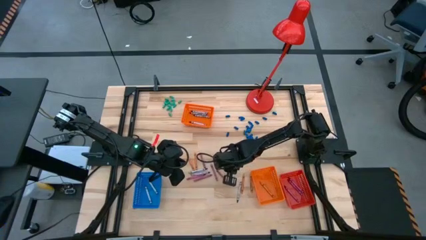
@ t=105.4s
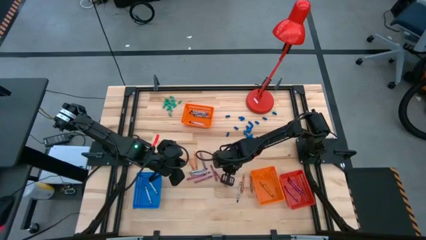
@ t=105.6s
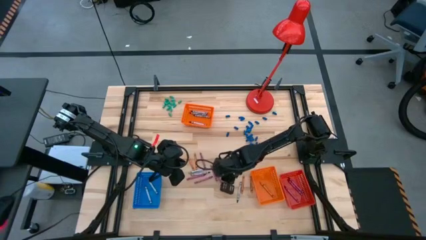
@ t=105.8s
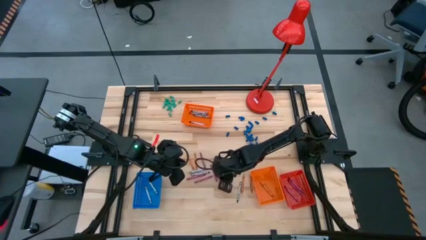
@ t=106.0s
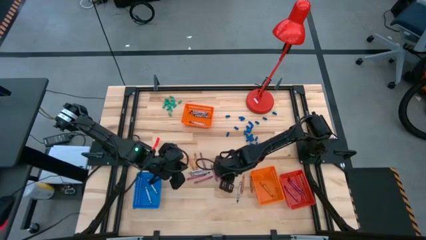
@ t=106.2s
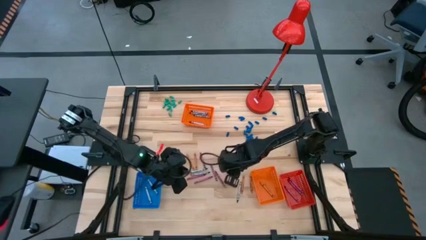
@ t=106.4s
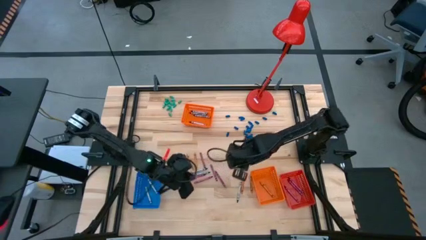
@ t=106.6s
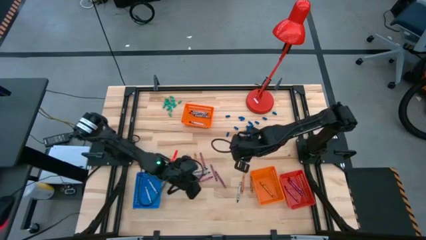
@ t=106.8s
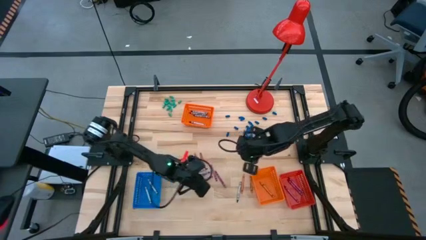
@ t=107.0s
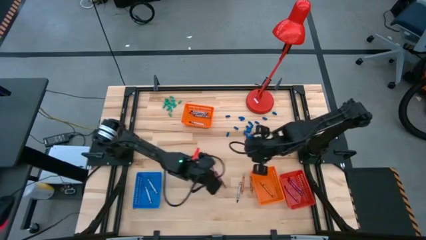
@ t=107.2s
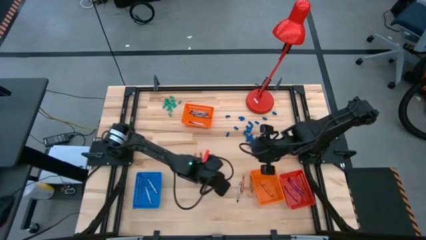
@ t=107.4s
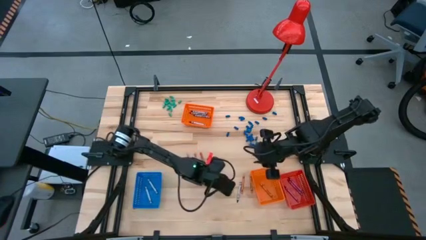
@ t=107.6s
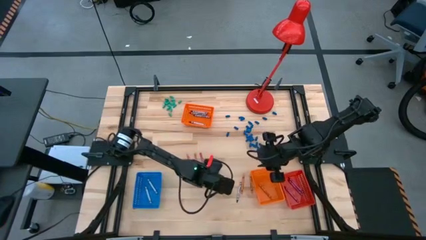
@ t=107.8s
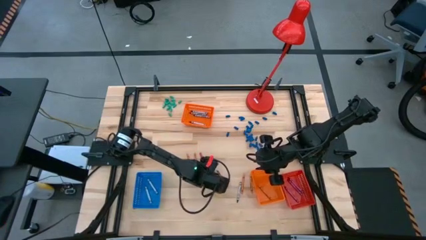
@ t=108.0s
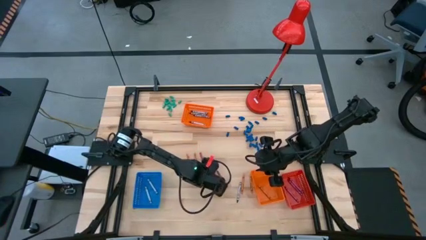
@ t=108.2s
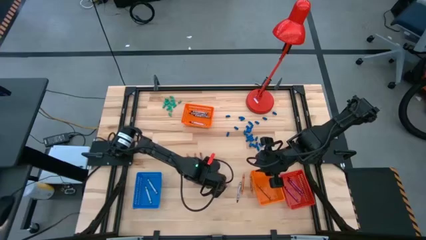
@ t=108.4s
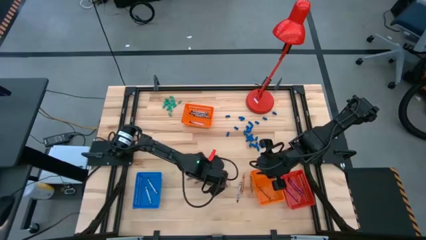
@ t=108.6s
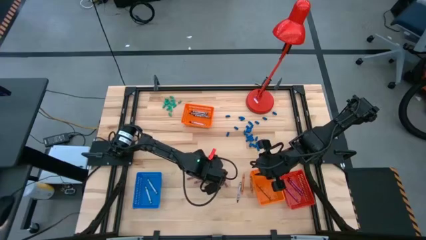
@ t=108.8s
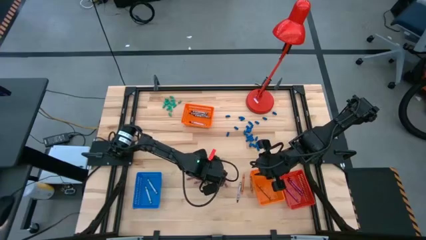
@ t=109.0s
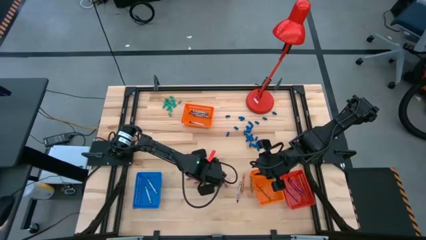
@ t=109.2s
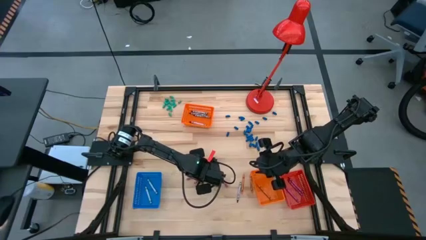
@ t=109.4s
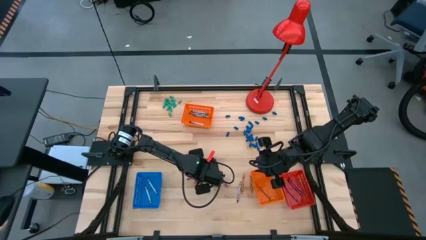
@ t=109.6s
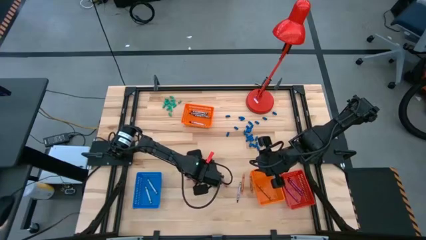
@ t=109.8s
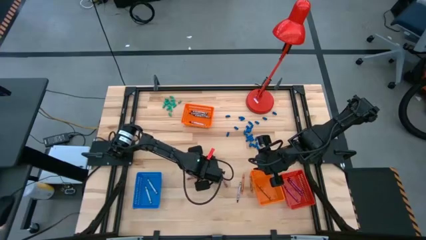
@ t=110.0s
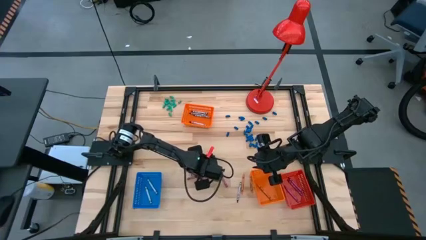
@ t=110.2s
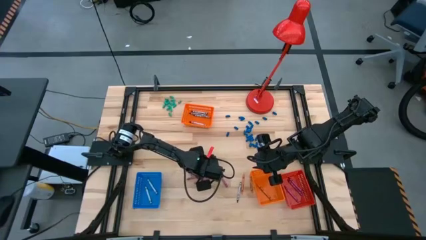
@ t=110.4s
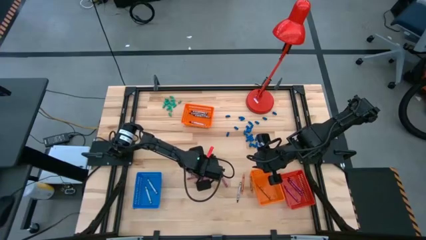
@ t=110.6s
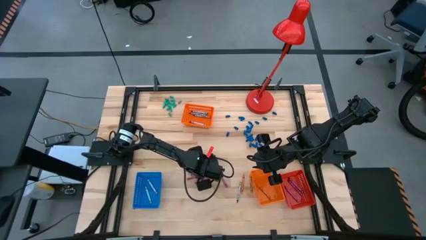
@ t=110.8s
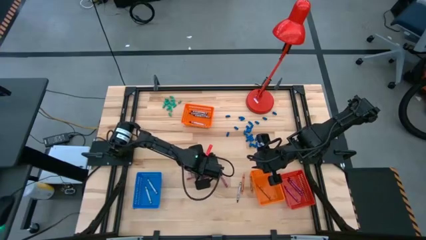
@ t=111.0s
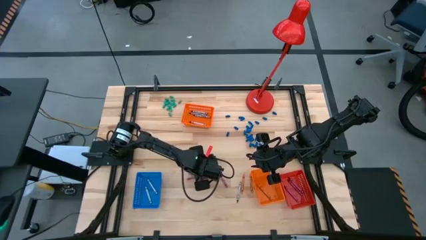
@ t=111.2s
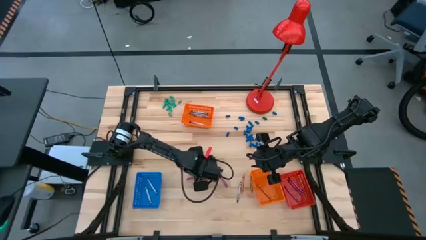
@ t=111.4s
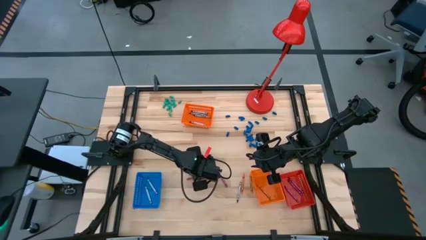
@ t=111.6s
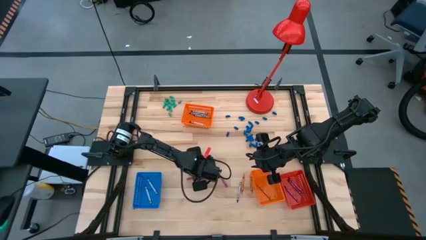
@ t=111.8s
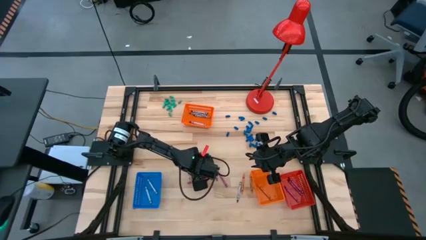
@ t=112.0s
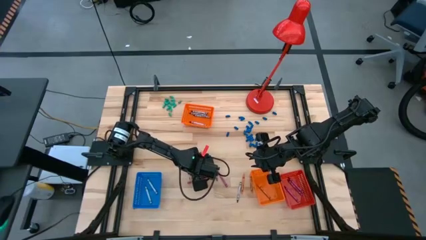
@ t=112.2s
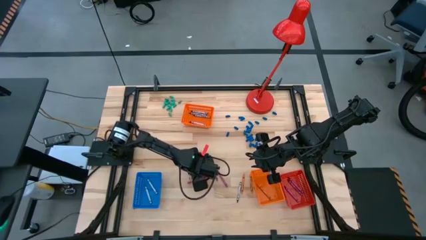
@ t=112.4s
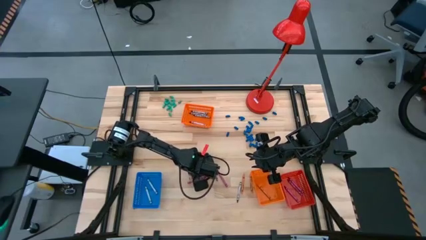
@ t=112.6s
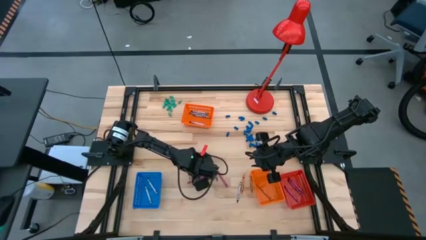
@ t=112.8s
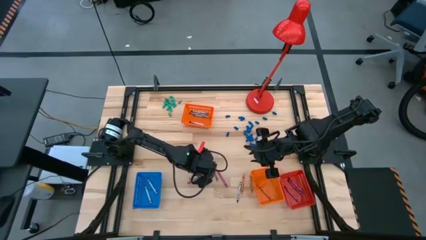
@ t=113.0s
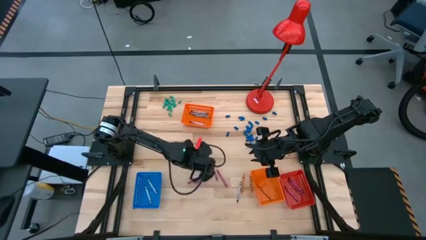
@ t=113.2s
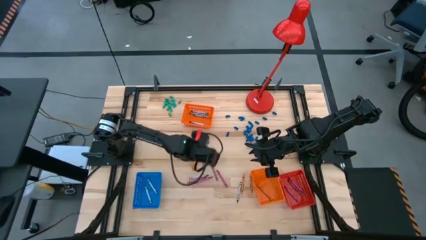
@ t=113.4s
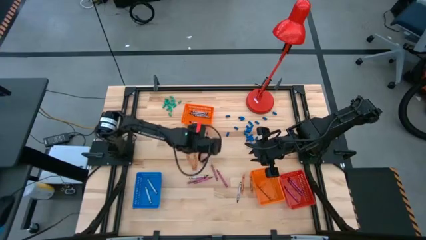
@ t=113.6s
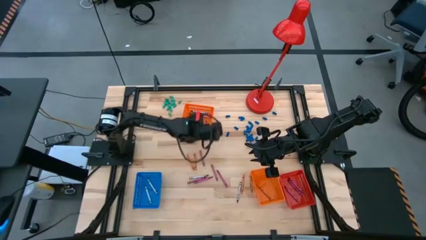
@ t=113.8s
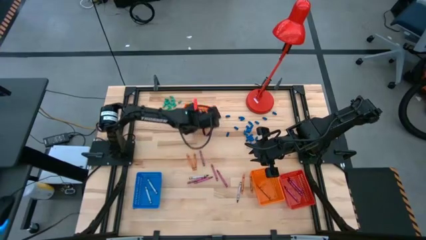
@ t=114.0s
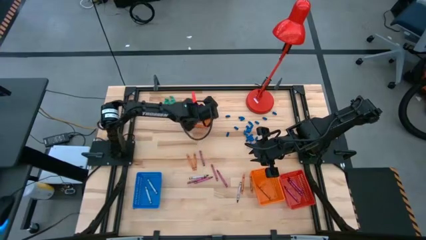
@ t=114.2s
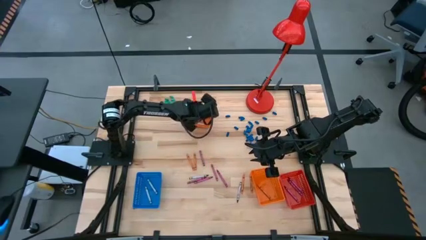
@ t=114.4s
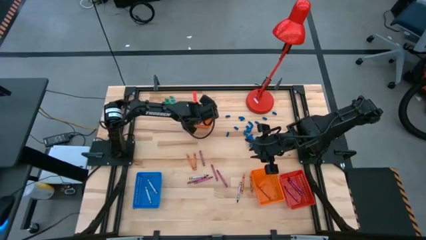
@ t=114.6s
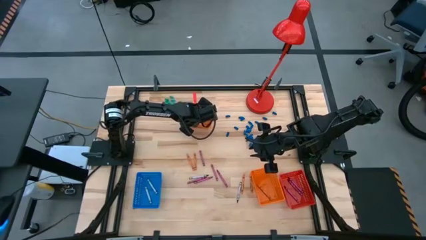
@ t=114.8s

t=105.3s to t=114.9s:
Task: Sort crayons
Put the black crayon into the top orange bin

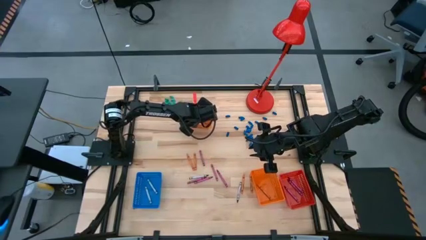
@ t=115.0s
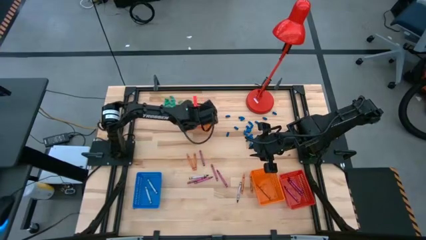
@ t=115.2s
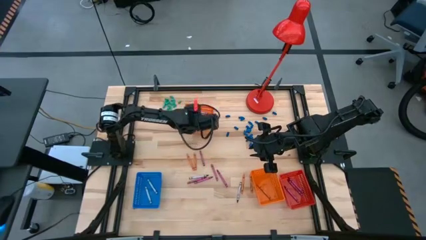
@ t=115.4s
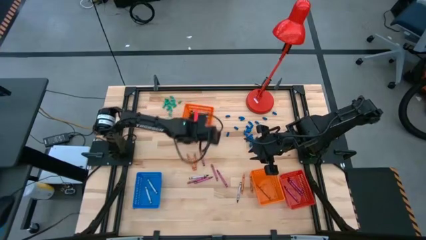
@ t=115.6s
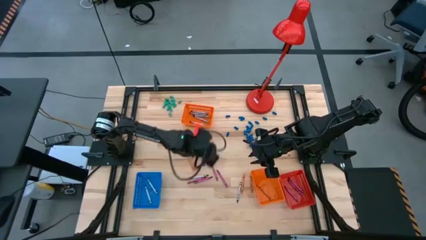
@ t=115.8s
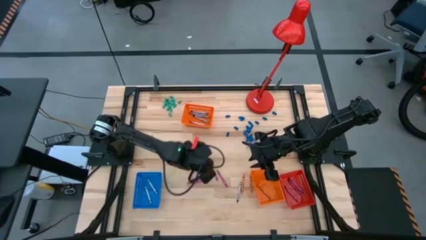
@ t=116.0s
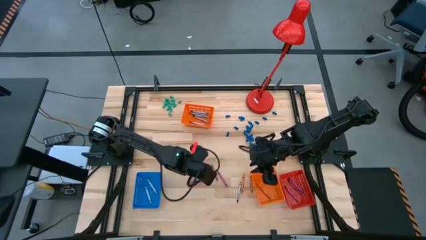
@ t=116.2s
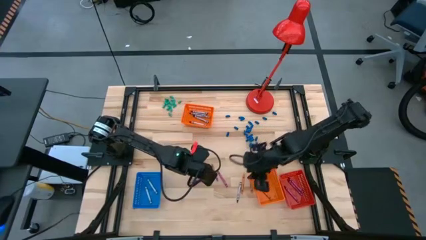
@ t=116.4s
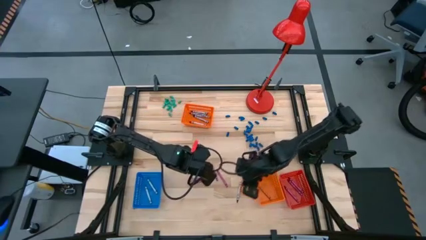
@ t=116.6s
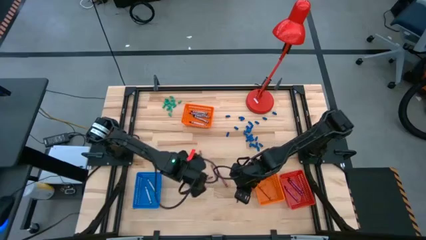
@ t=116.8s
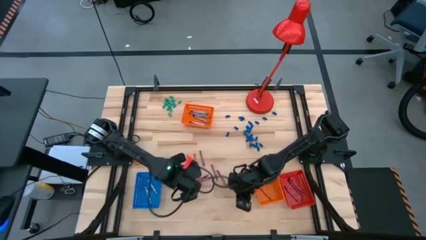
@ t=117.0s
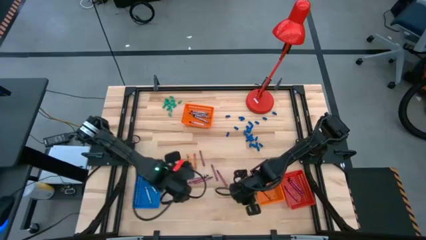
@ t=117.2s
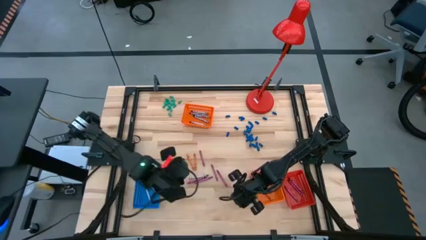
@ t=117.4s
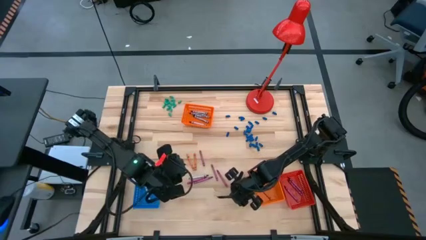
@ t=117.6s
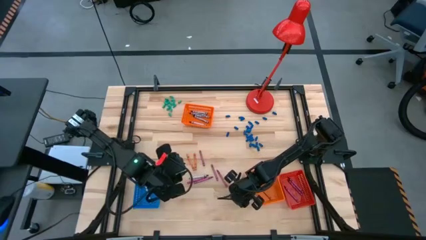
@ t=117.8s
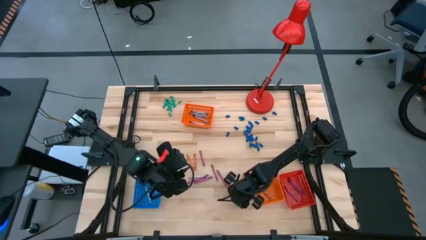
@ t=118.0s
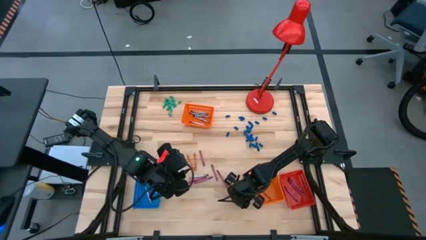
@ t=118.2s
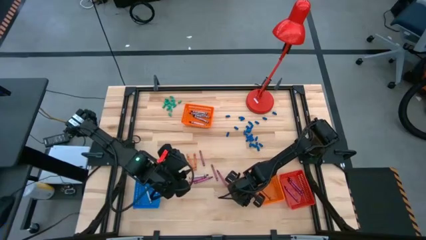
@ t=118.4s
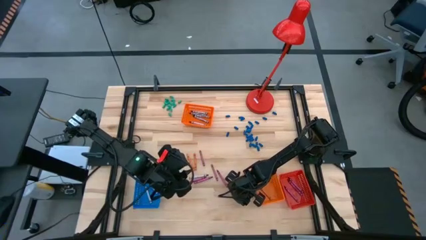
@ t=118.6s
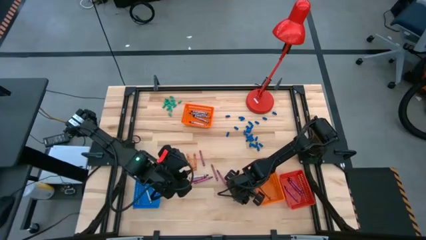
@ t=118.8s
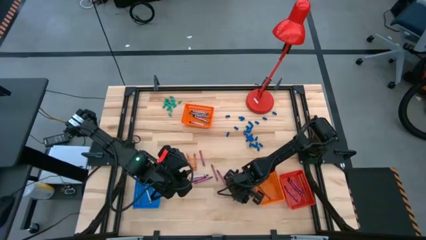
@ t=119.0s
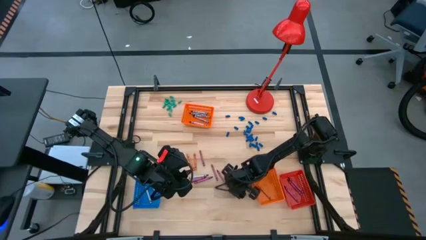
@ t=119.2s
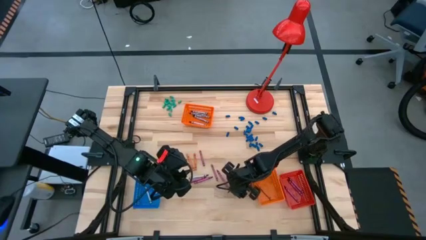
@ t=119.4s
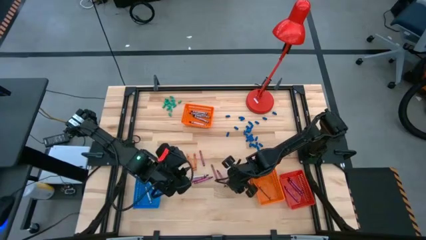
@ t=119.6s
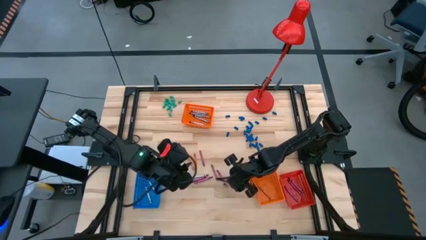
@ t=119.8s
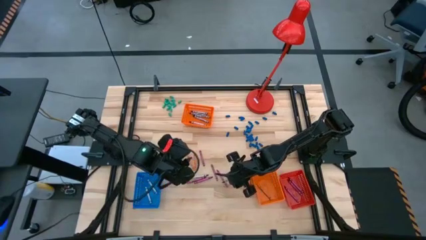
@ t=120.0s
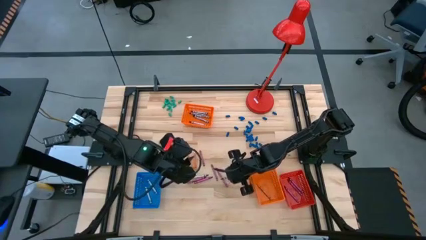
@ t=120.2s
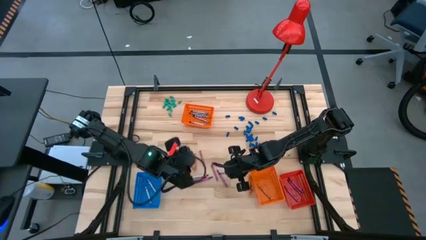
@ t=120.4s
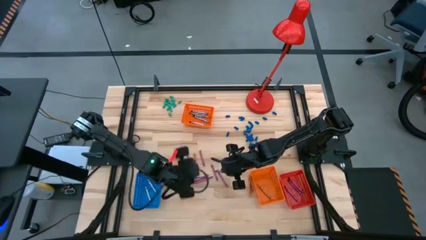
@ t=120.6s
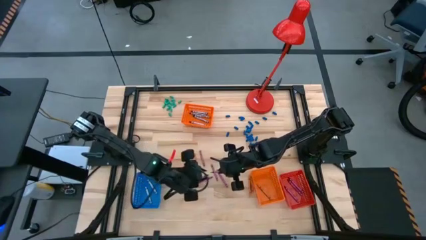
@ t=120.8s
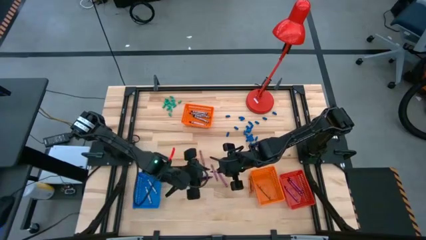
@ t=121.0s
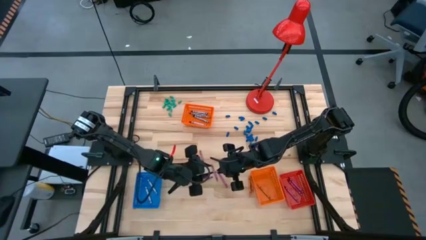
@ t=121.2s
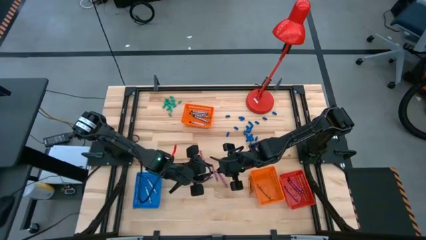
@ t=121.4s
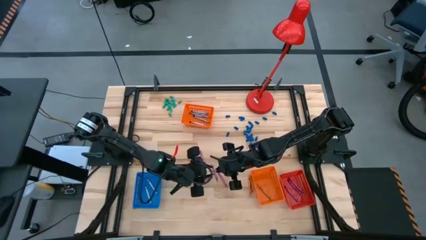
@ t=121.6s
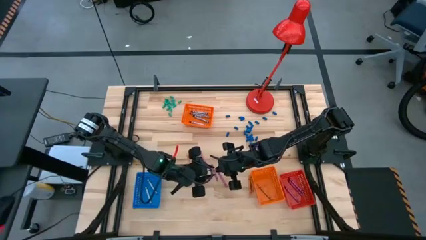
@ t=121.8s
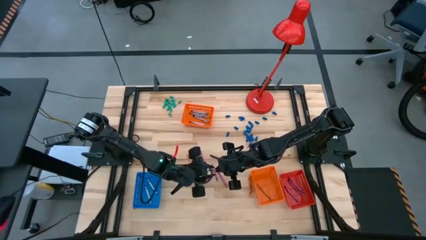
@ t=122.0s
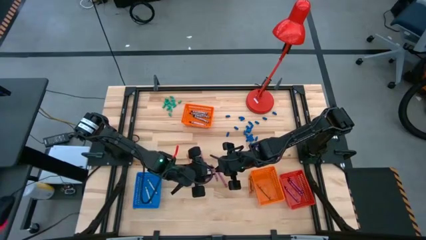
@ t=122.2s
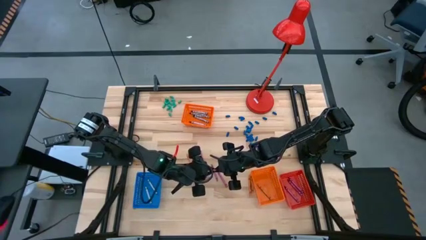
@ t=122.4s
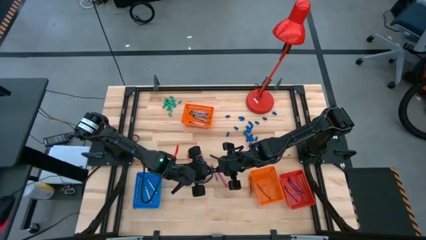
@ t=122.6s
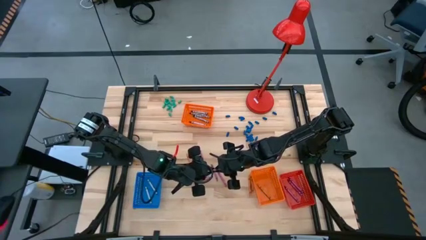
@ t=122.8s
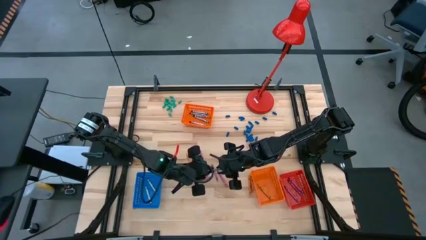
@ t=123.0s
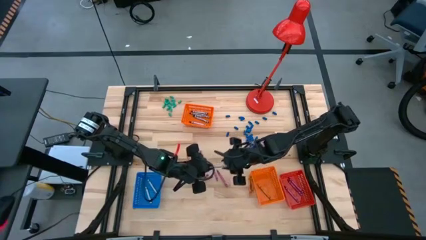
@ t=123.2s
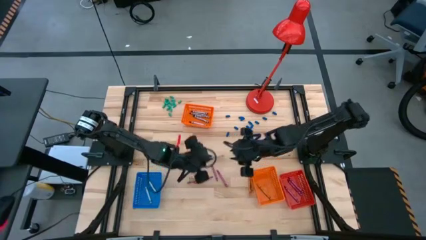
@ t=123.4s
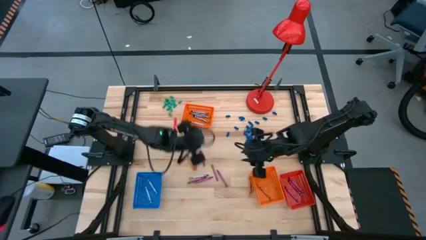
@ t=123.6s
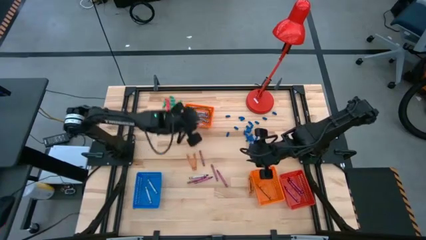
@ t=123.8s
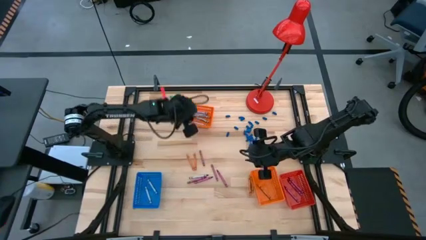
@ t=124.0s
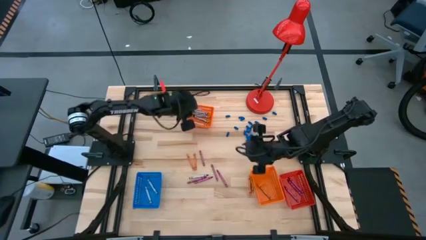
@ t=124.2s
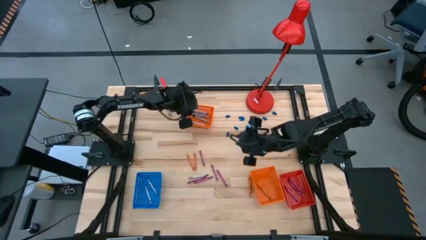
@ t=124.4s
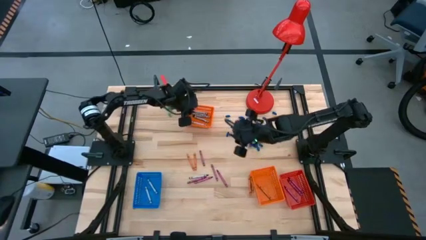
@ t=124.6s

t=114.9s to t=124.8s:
Put the black crayon into the top orange bin
